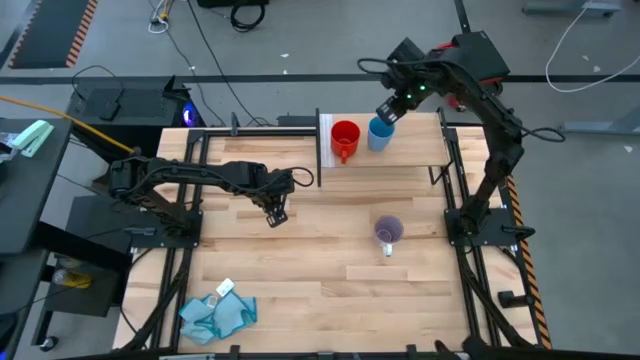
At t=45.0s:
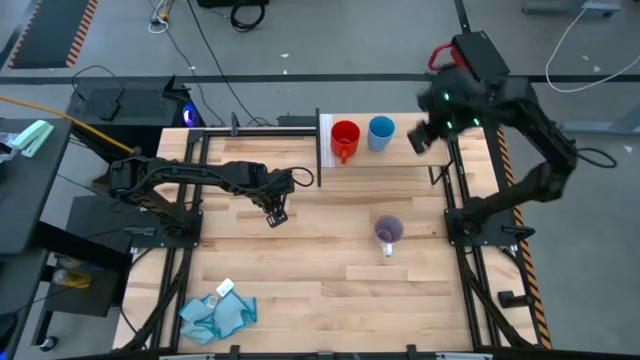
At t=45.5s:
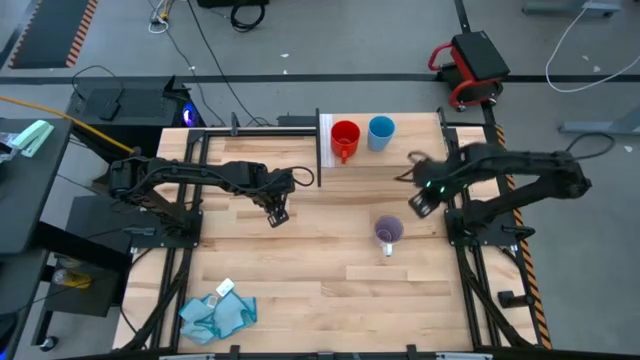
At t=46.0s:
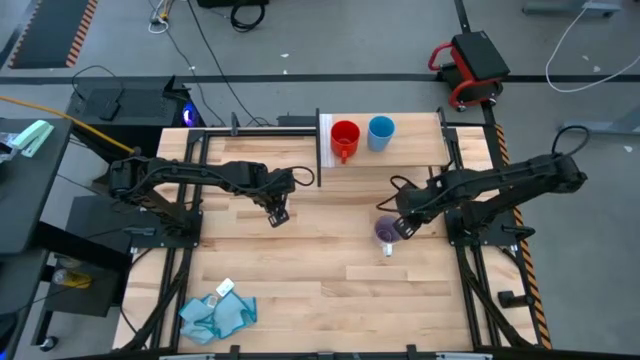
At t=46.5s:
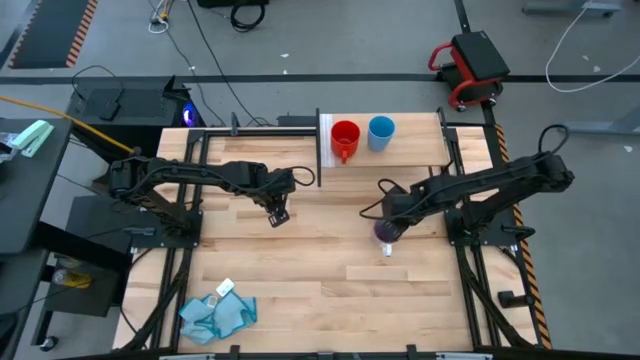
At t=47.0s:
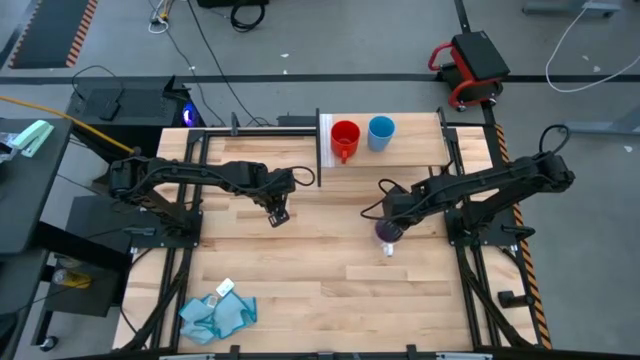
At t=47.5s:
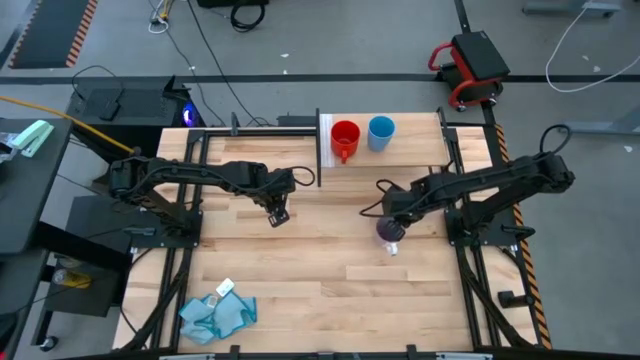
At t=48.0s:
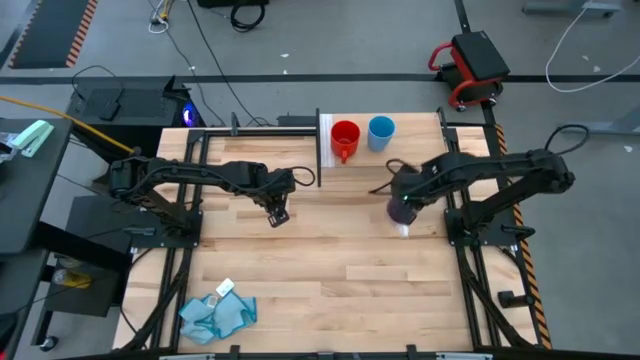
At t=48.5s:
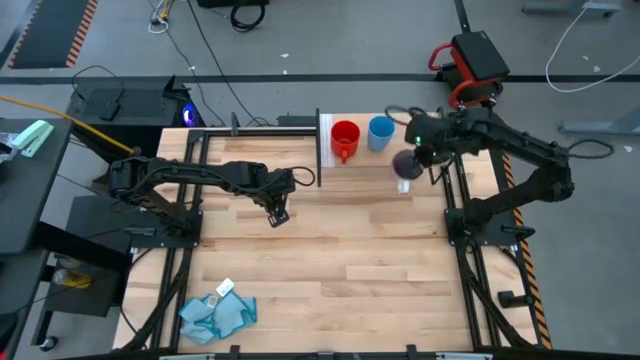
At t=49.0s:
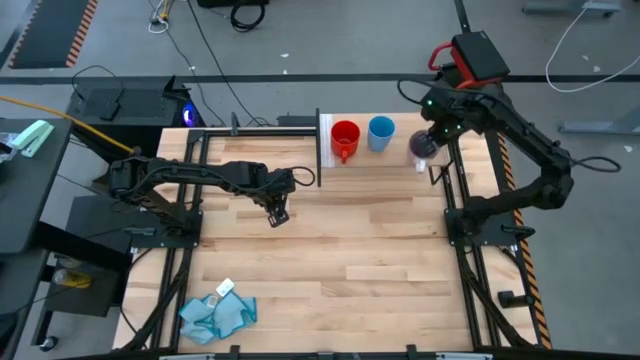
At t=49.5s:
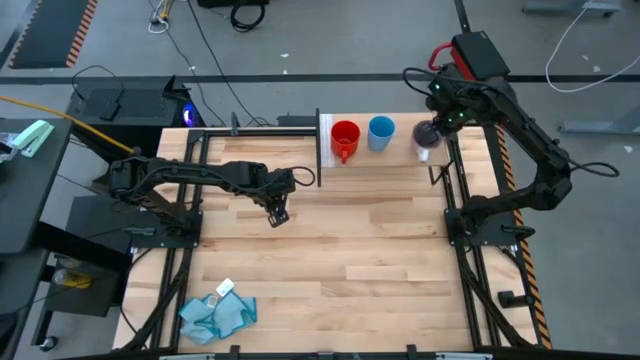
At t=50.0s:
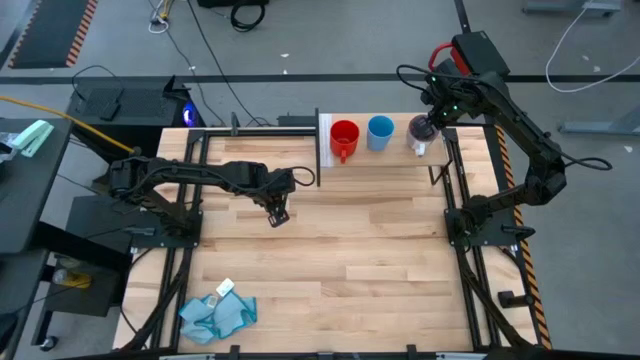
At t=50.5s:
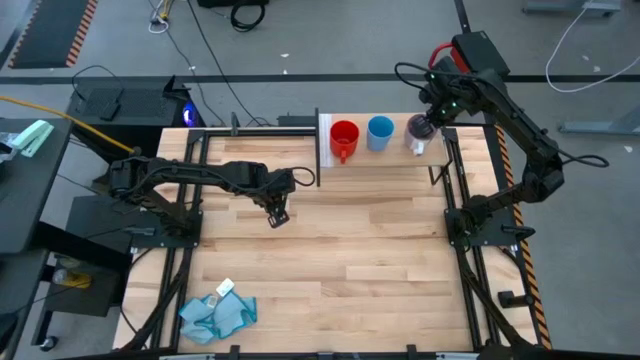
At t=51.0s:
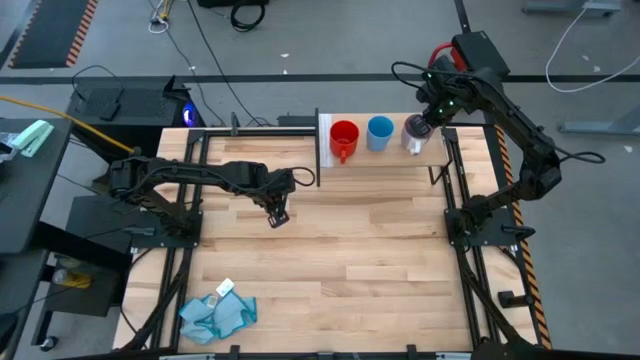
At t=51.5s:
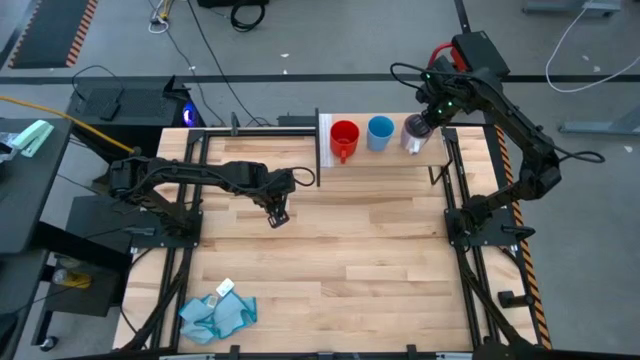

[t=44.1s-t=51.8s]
Task: Stack small to large cups/mugs on shelf
Put the violet and white mug on the shelf

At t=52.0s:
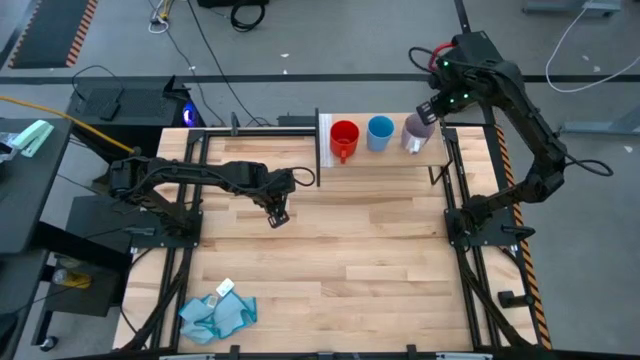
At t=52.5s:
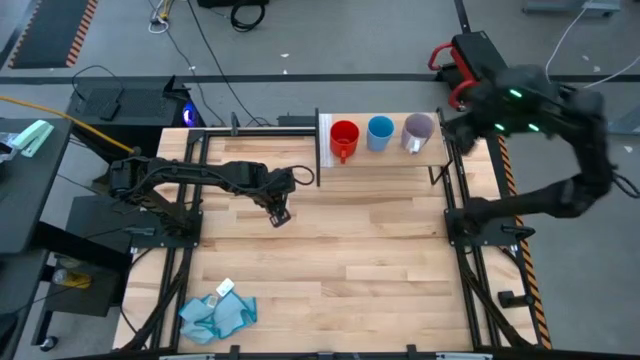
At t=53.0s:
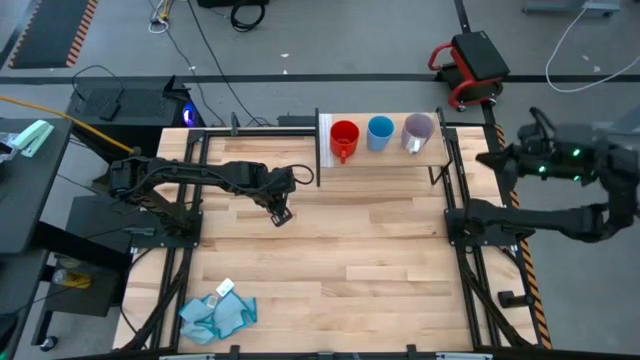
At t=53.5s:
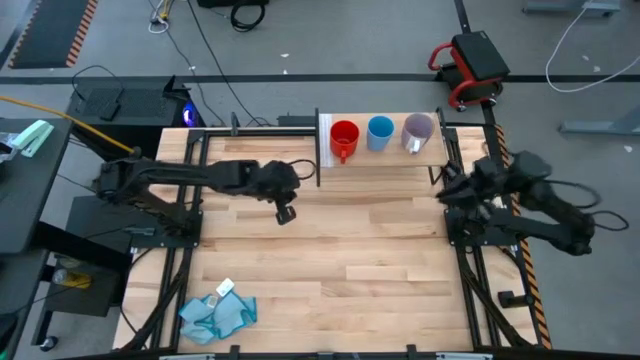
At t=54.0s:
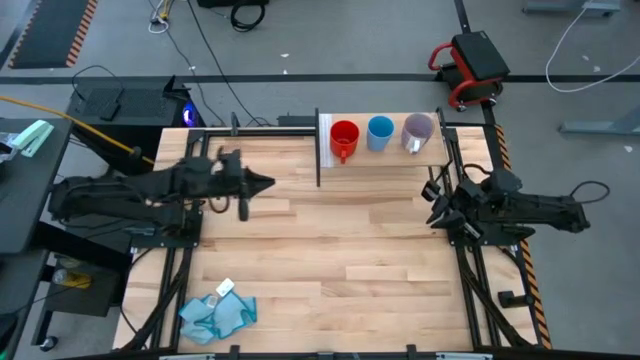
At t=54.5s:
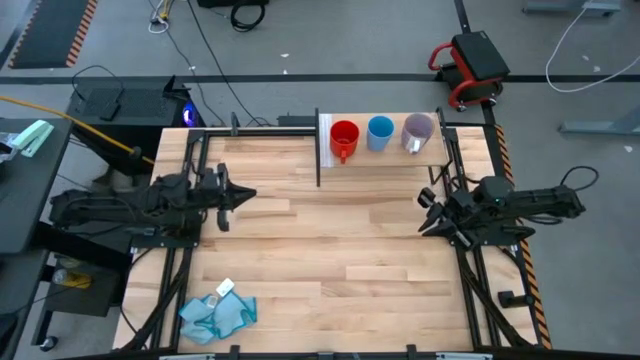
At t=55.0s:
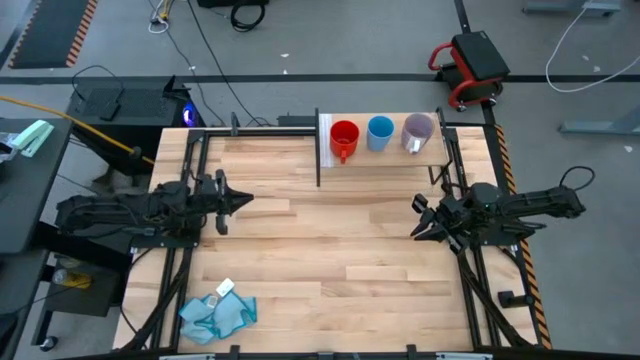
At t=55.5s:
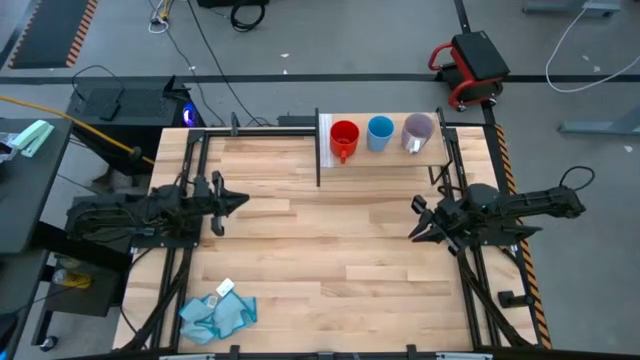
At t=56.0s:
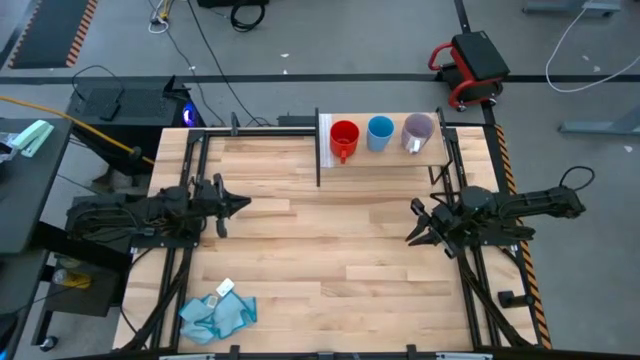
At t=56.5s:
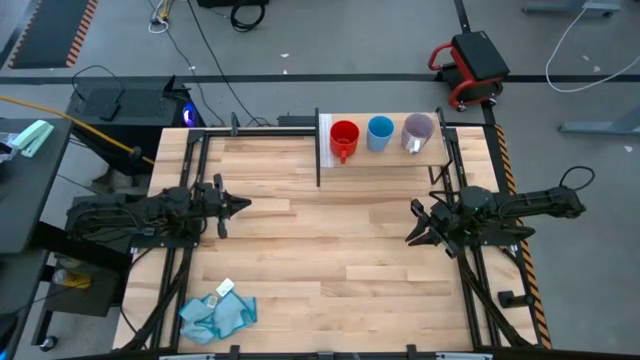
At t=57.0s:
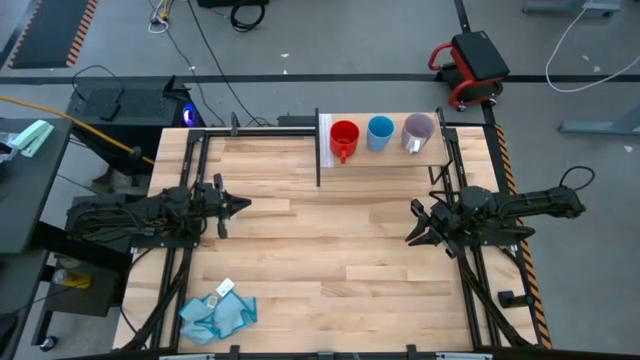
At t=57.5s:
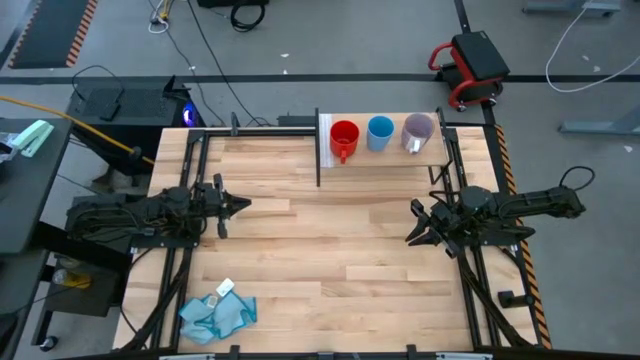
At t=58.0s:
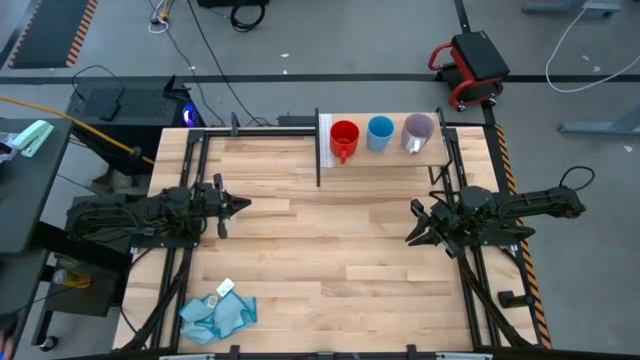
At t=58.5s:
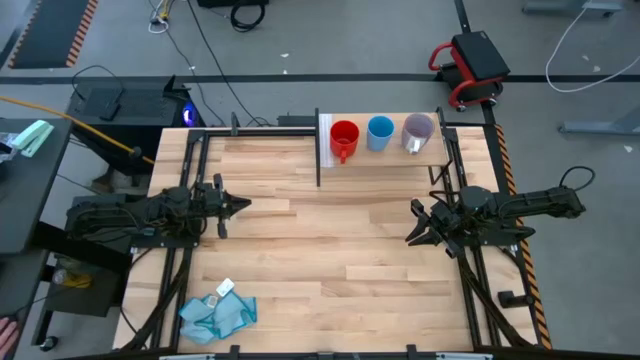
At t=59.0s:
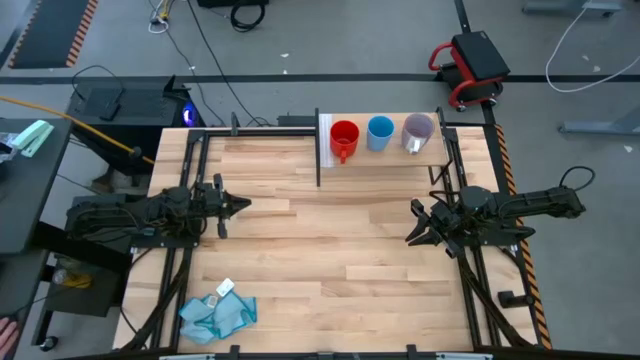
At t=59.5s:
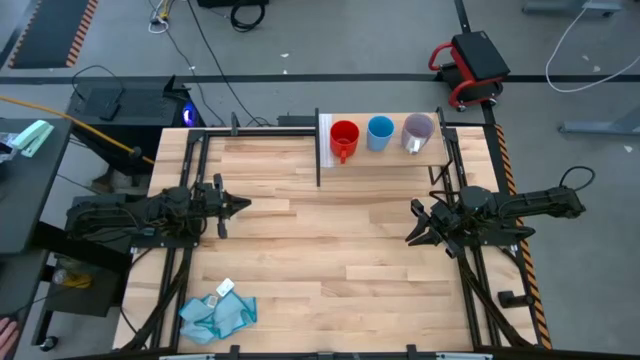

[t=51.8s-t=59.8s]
Return to Home Position

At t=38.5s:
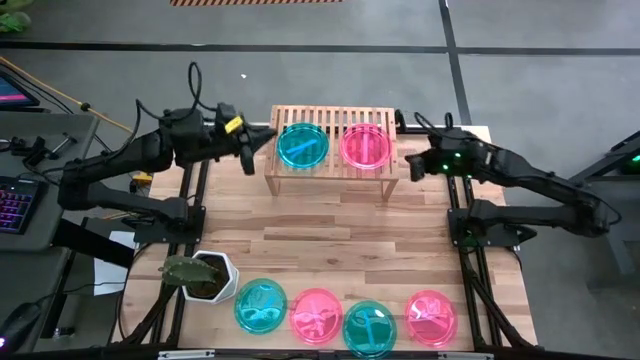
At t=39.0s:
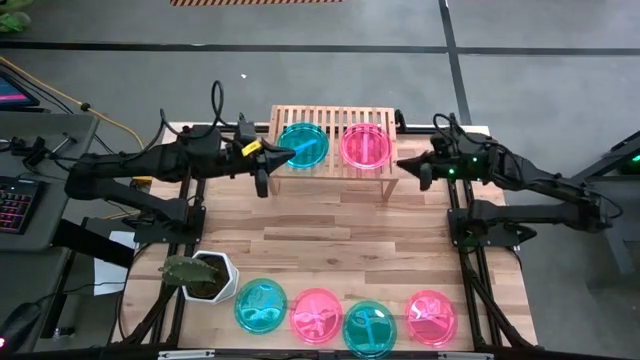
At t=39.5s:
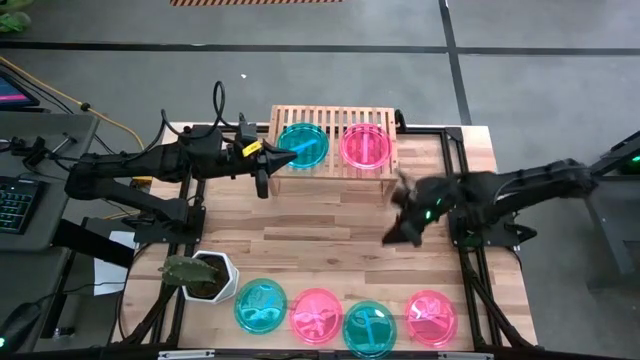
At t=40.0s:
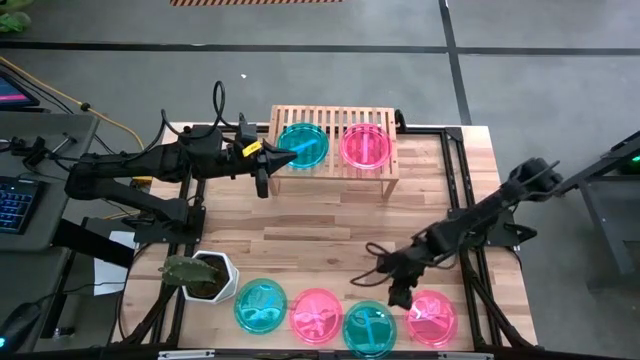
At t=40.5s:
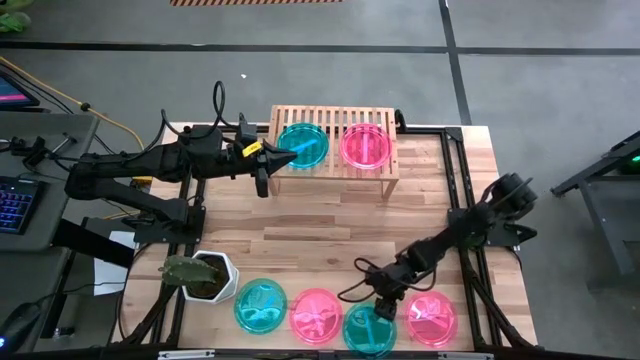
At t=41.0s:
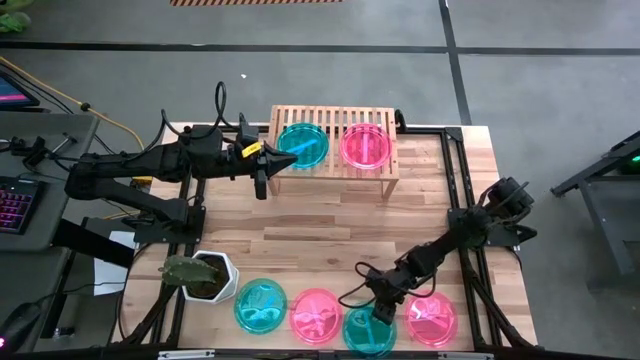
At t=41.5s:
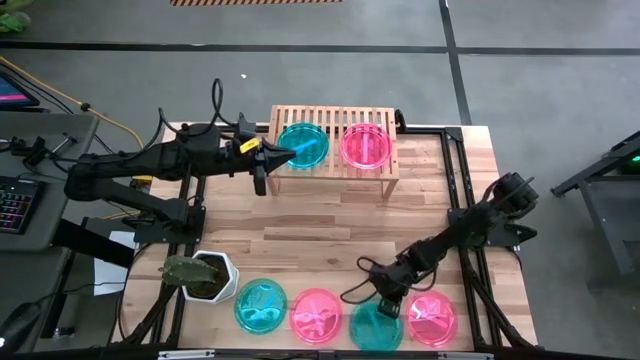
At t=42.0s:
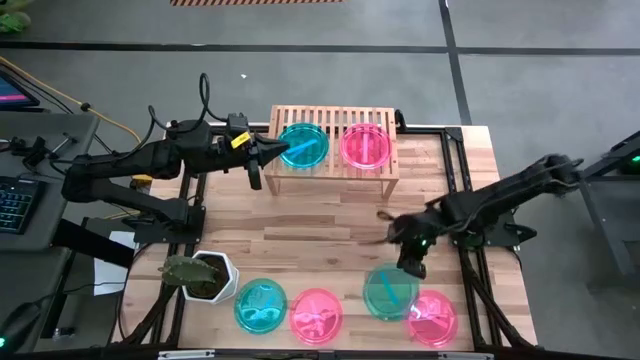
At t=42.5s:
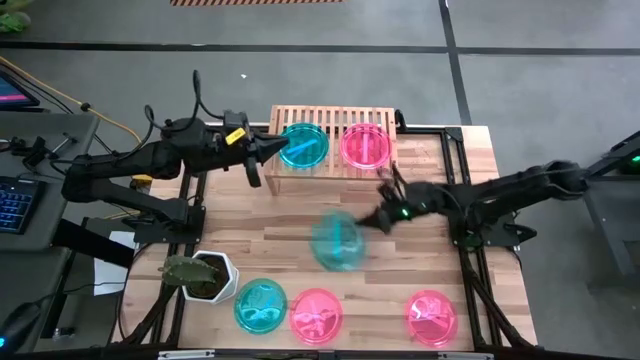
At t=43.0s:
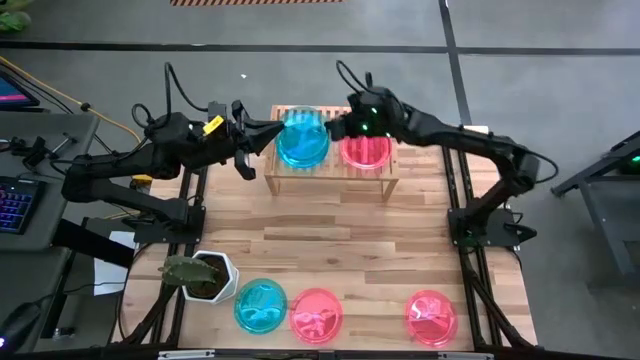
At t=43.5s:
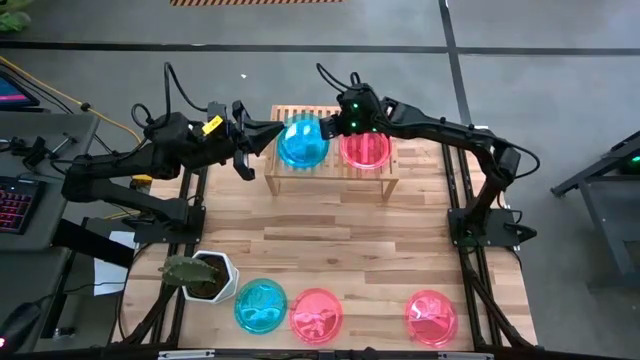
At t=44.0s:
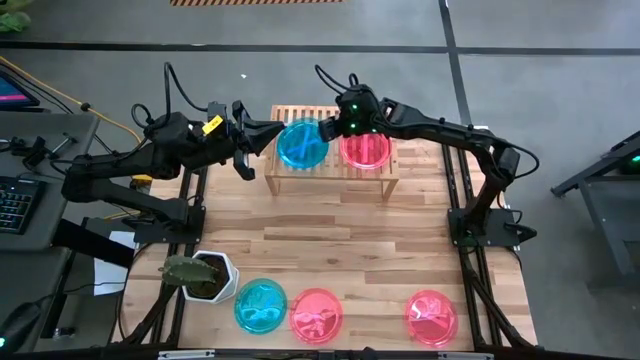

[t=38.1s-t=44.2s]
Task: Place and stack plates onto a shelf
Stack the right blue plate on the blue plate
